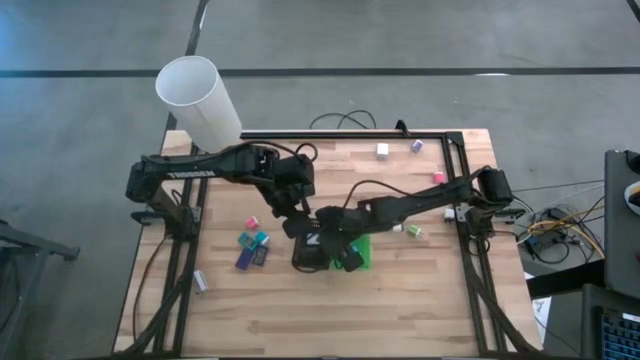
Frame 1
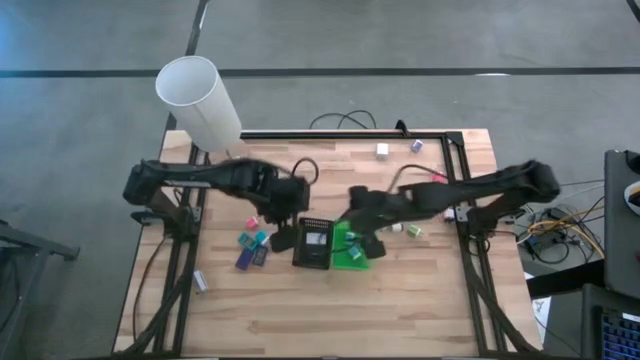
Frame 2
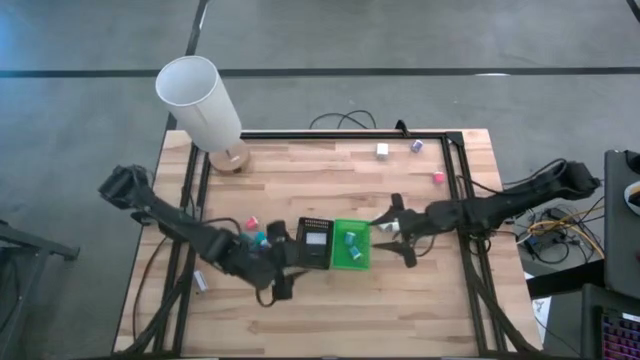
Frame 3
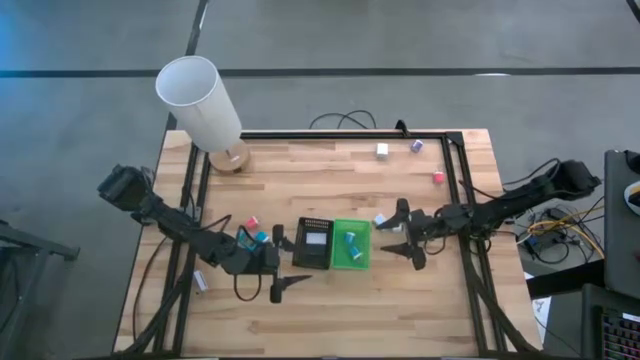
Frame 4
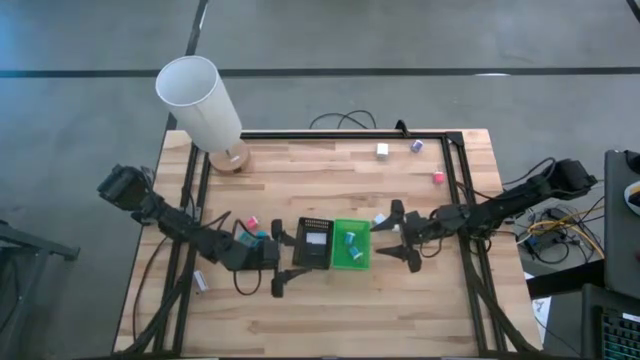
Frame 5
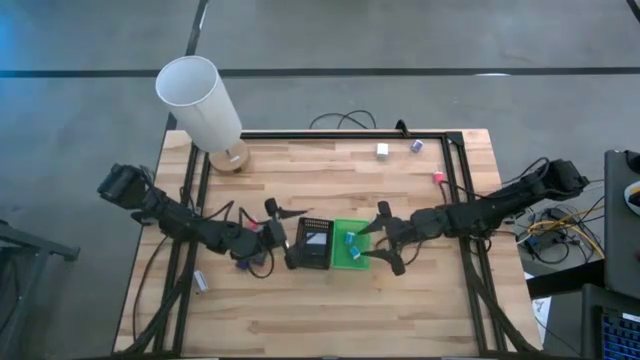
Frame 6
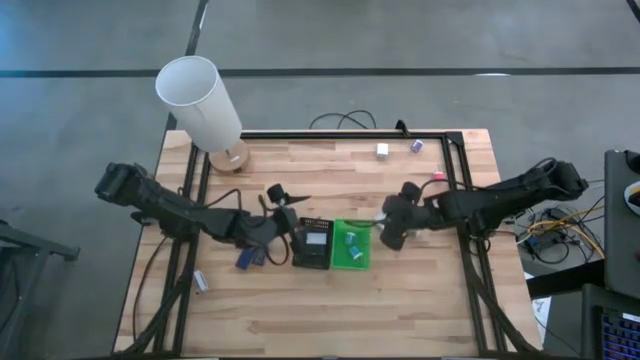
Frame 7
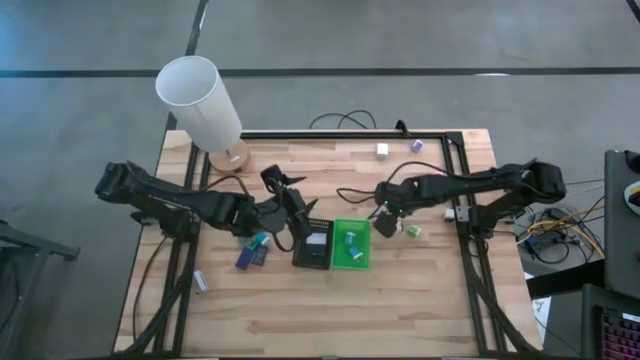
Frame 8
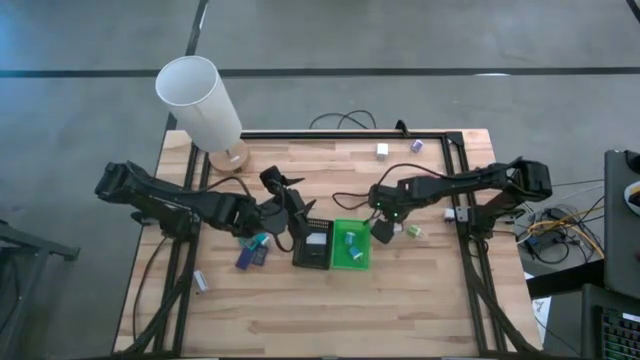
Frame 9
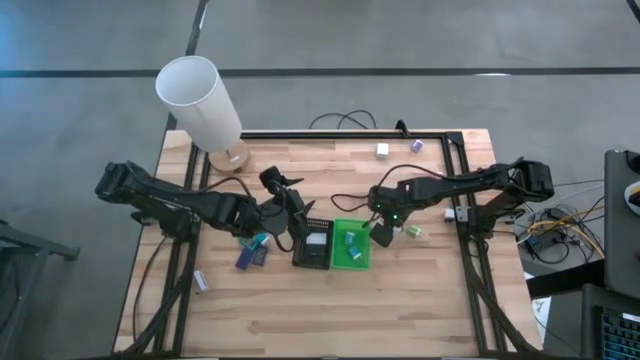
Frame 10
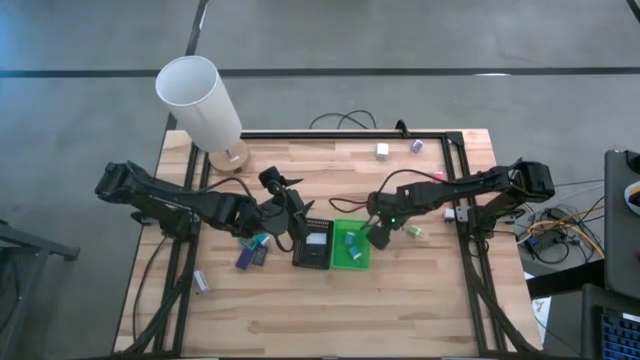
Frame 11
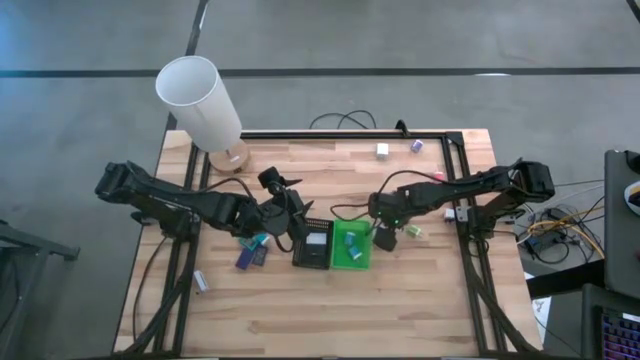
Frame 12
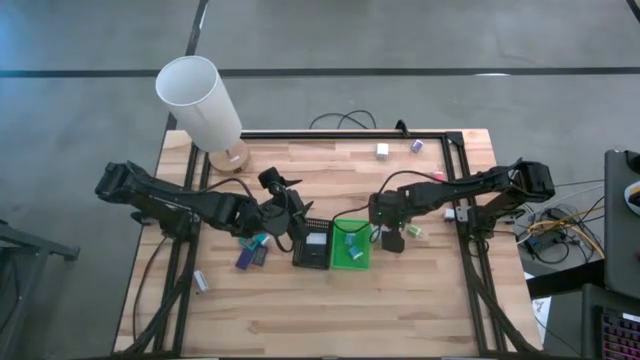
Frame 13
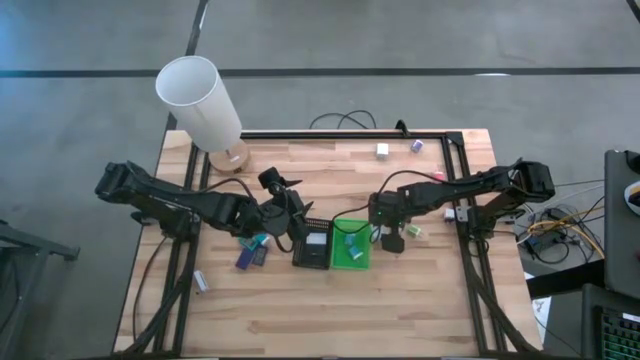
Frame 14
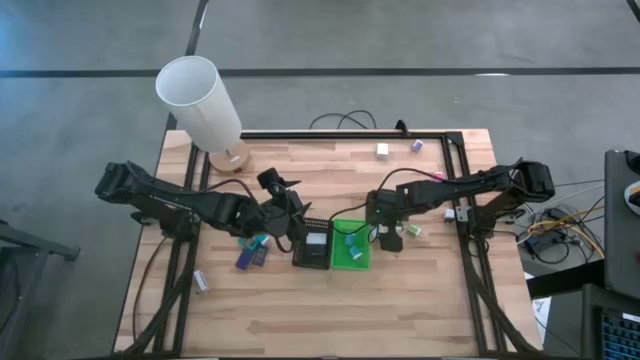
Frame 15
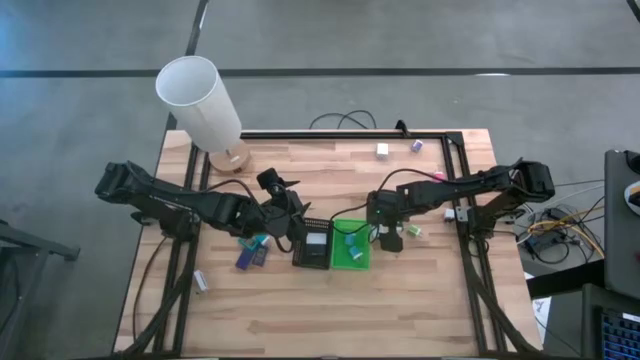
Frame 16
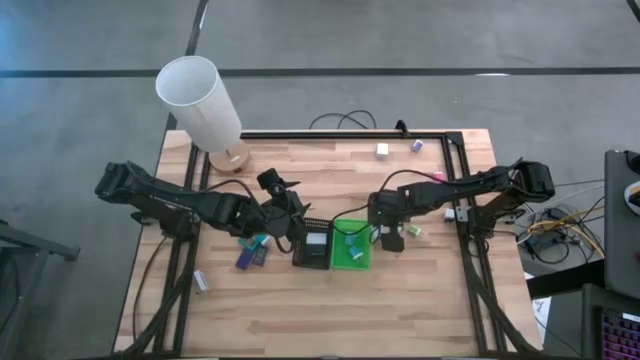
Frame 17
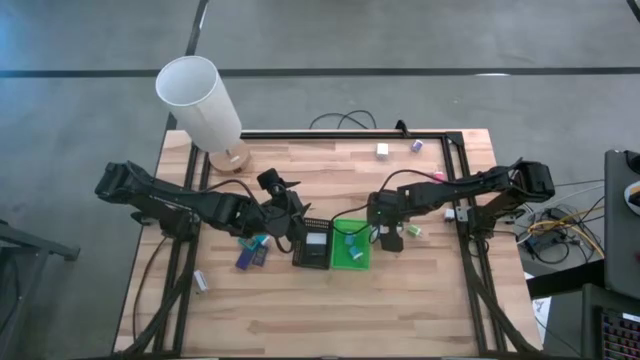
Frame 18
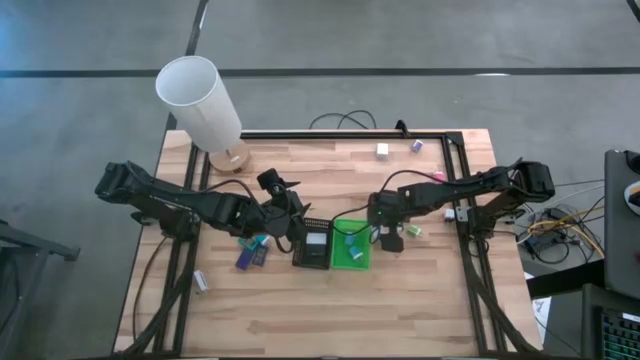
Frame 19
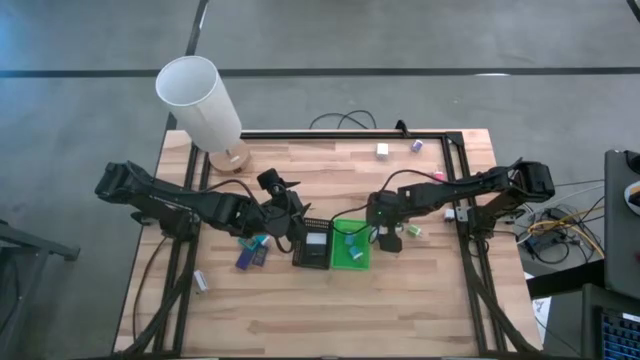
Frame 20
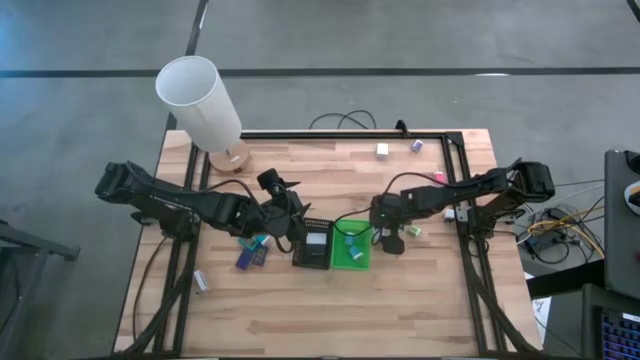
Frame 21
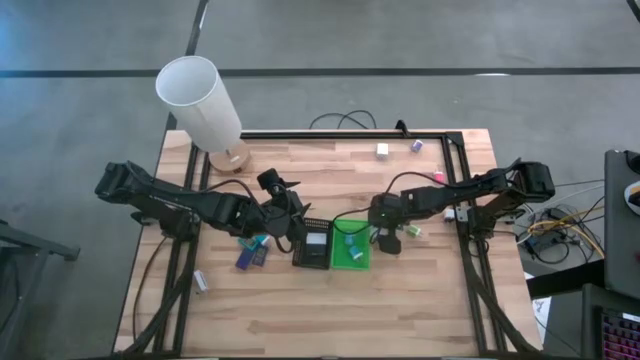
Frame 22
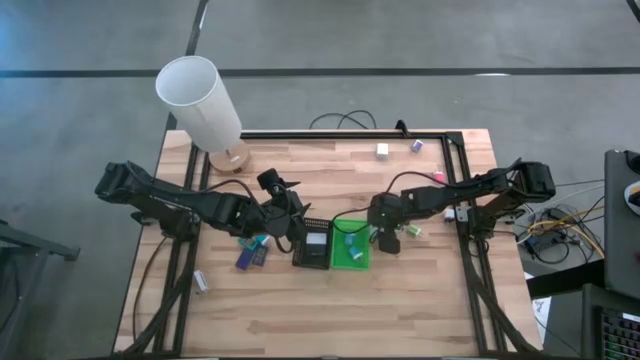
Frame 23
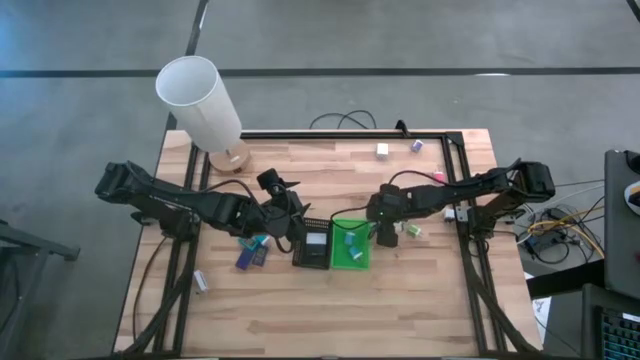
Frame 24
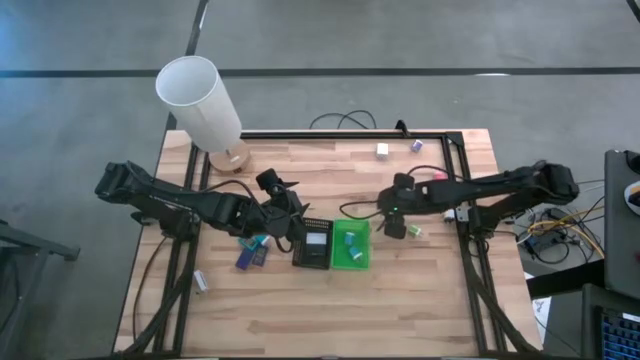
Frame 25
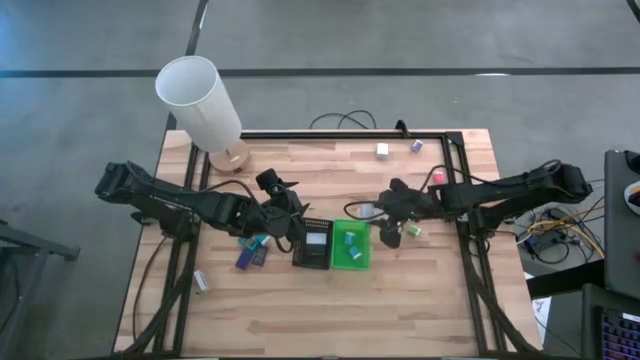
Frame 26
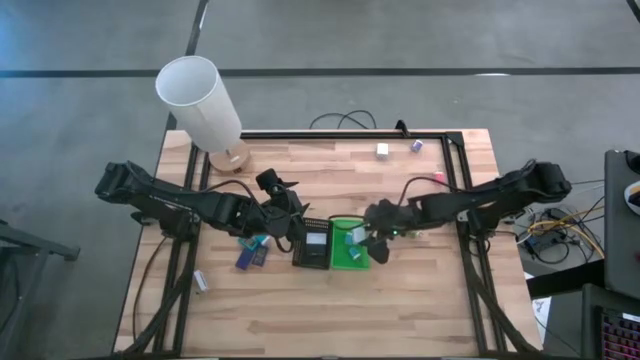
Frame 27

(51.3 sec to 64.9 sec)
Task: Pick & Place Office items
Put the bottom white charger adapter into the green basket

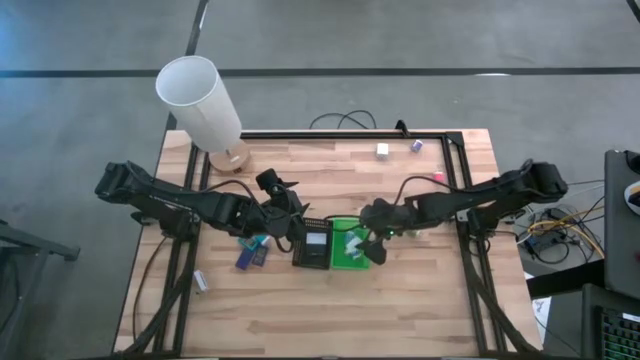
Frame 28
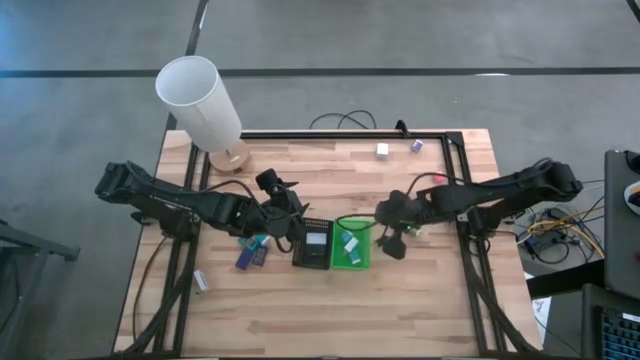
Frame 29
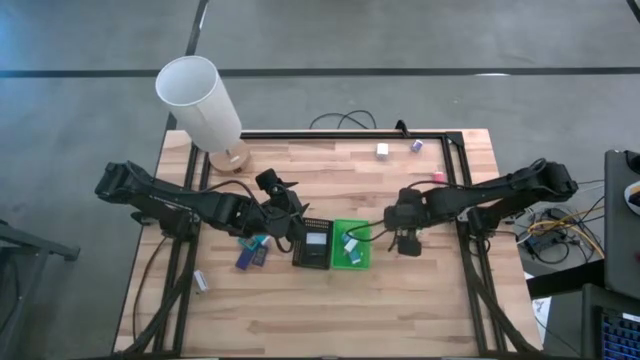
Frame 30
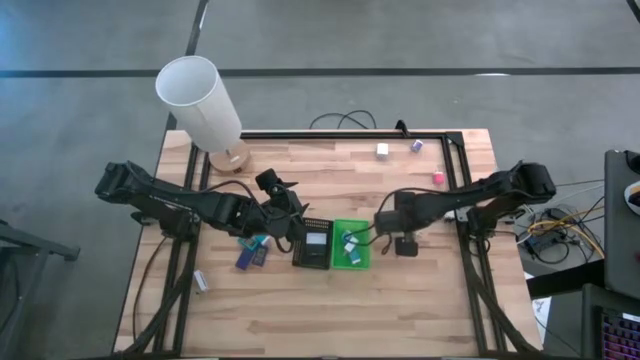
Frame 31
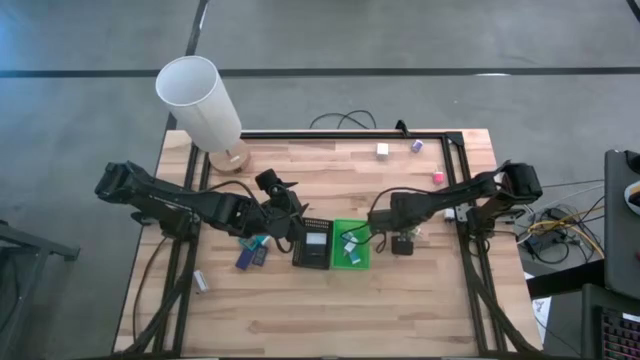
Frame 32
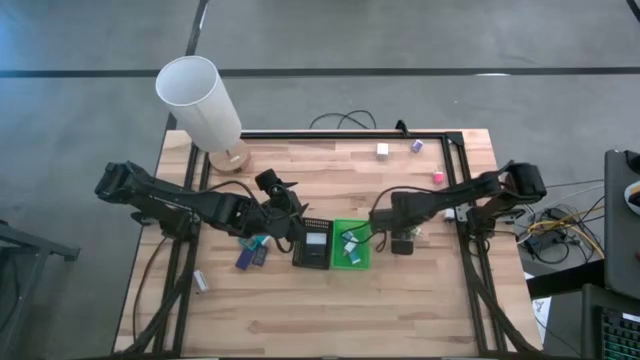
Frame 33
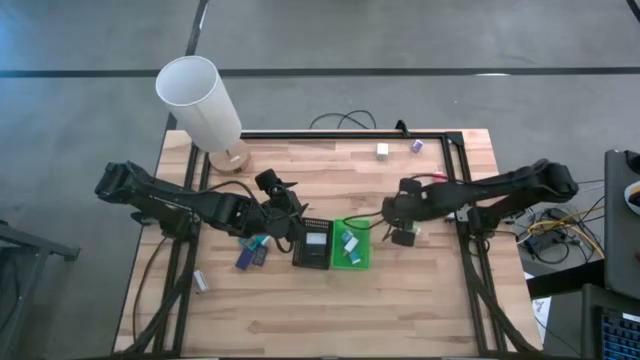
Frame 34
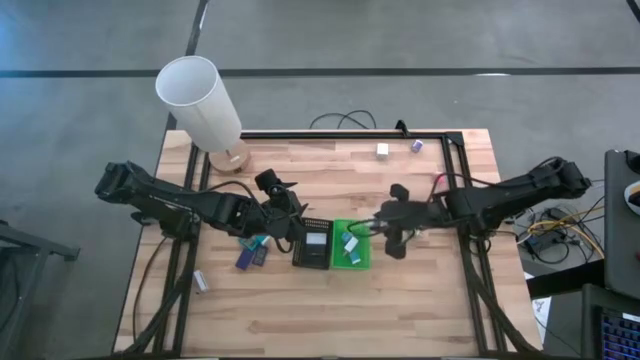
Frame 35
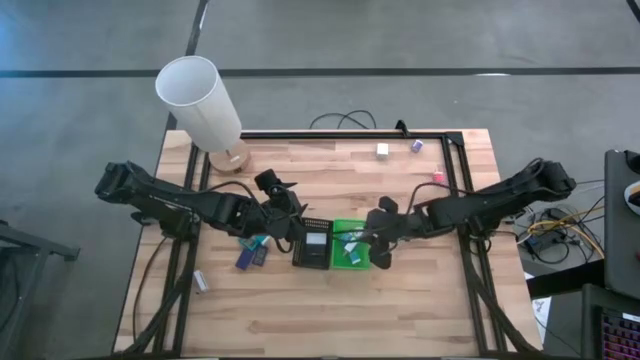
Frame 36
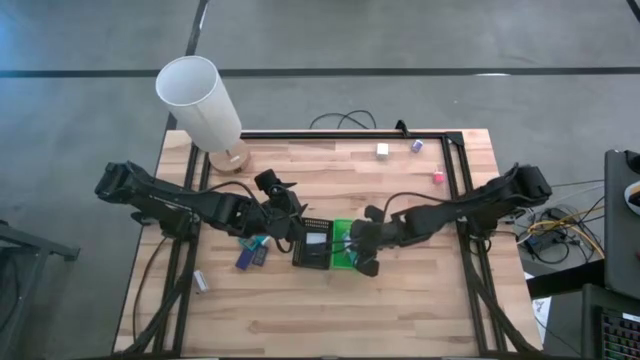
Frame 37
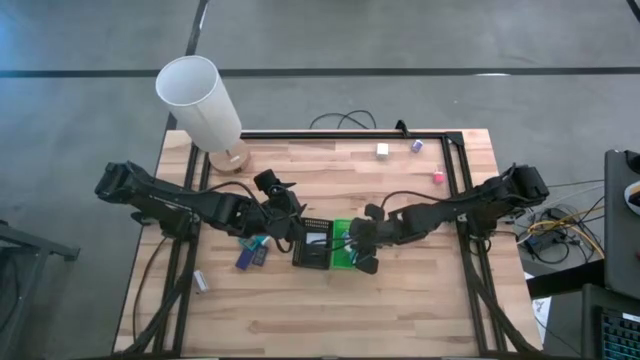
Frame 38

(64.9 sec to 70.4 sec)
Put the left white black charger adapter into the green basket

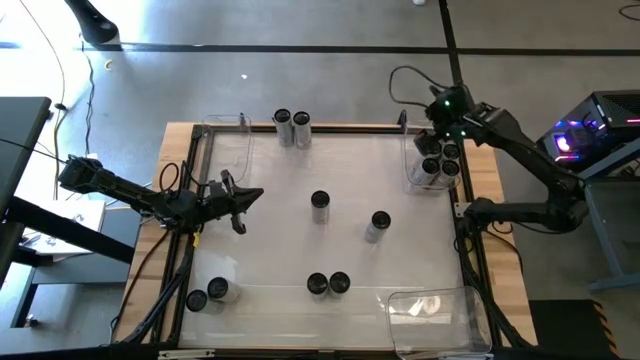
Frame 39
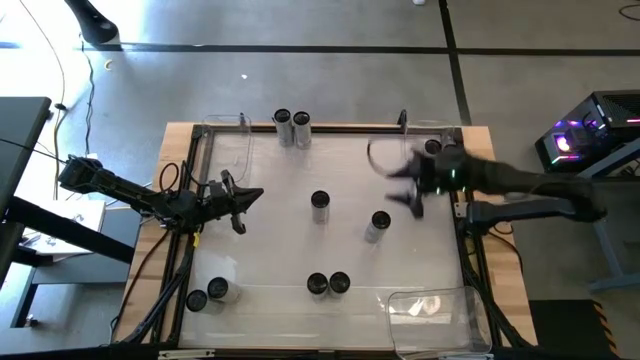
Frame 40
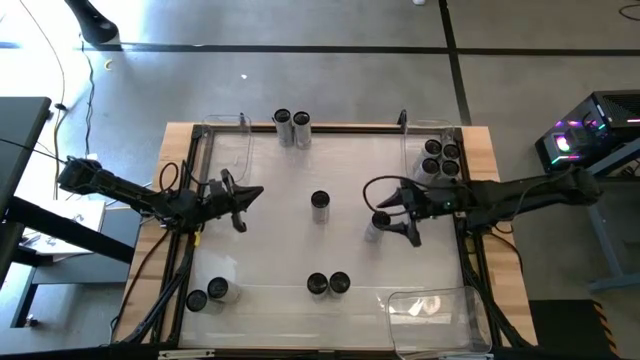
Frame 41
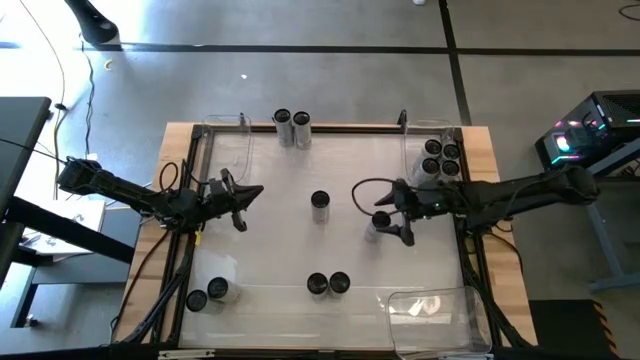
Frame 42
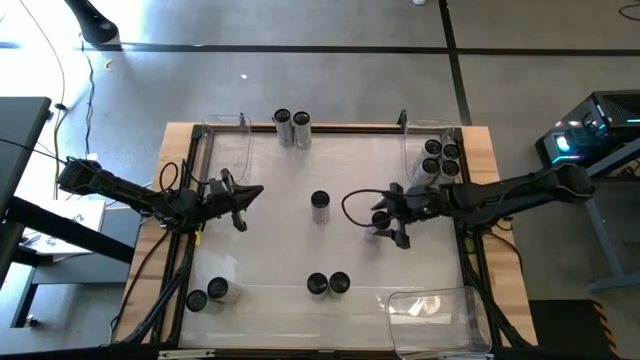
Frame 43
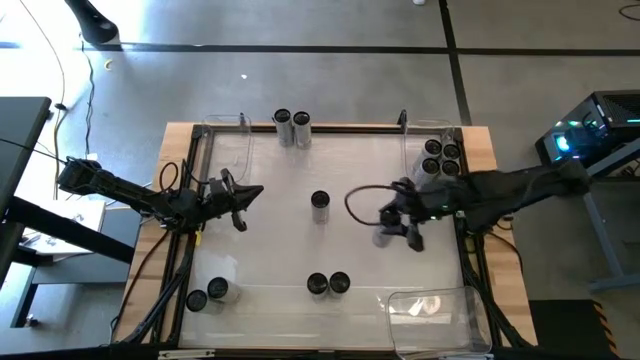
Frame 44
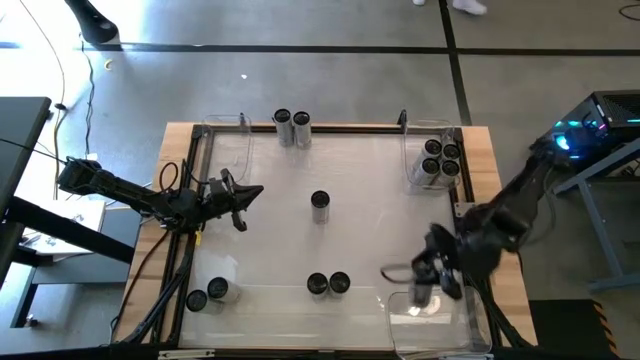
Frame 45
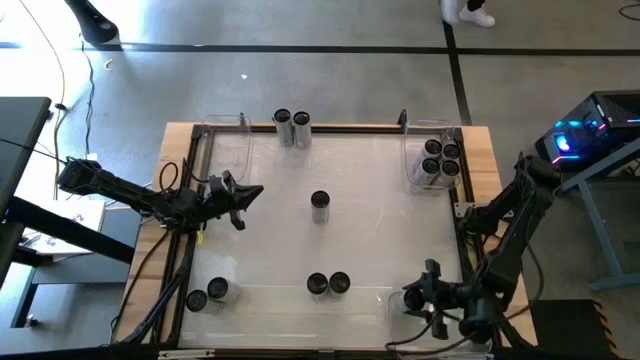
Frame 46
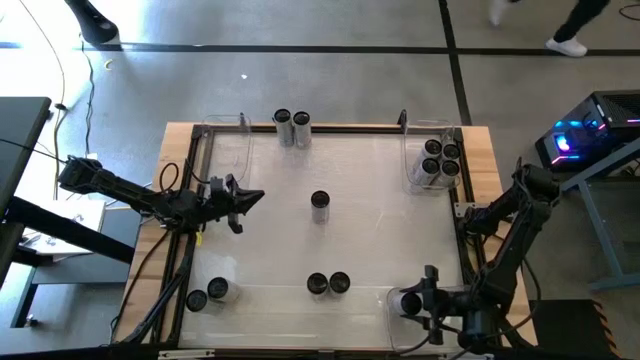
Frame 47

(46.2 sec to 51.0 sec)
Task: Sort soda cans
Put the blue soda can into the bottom right transparent bin
